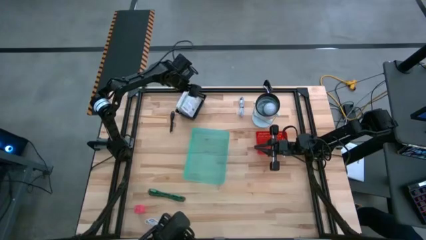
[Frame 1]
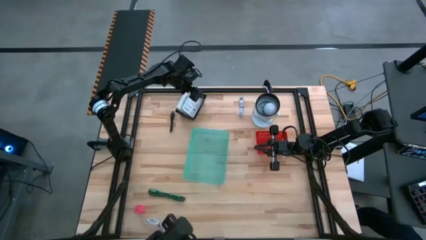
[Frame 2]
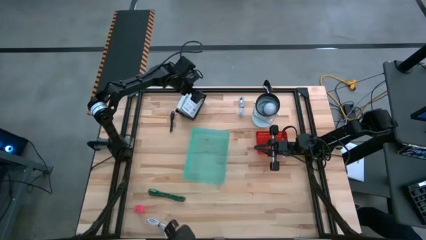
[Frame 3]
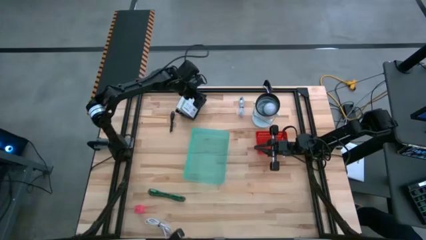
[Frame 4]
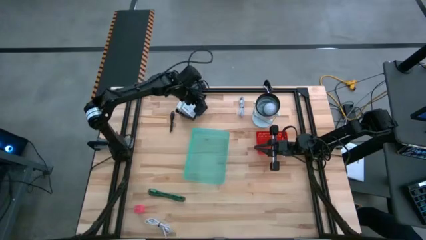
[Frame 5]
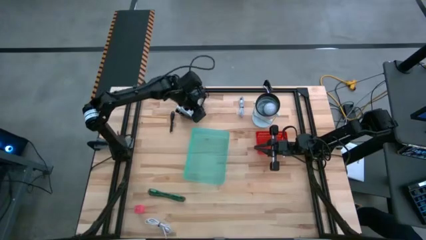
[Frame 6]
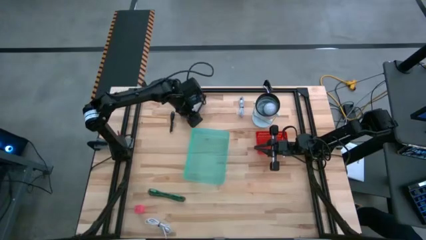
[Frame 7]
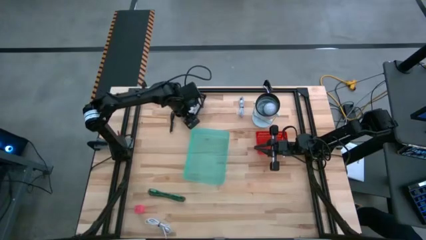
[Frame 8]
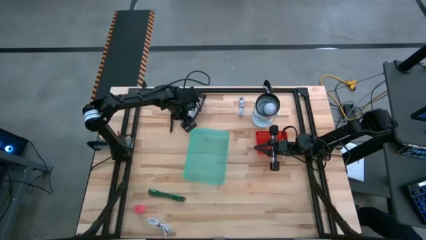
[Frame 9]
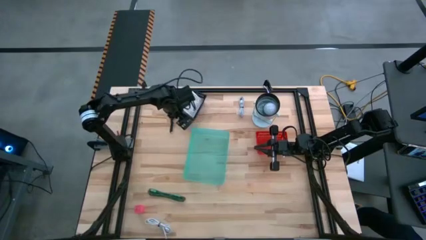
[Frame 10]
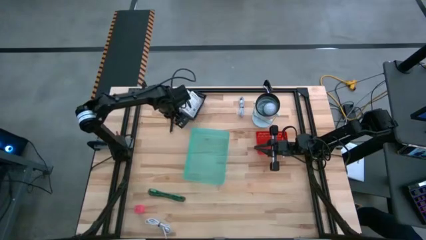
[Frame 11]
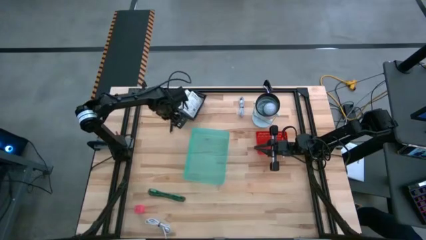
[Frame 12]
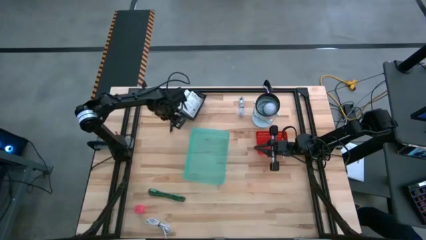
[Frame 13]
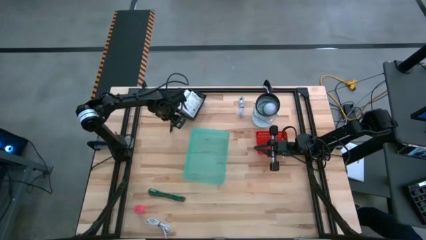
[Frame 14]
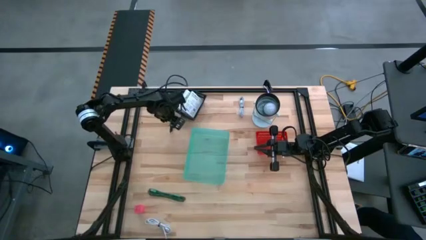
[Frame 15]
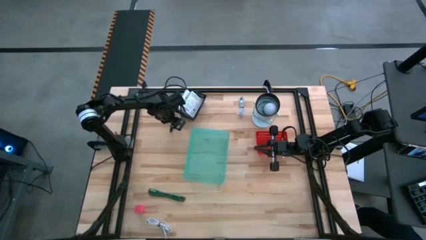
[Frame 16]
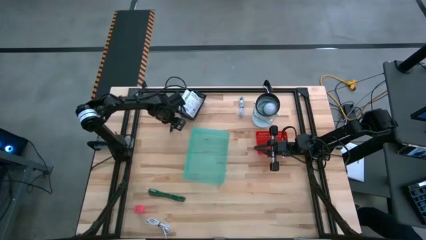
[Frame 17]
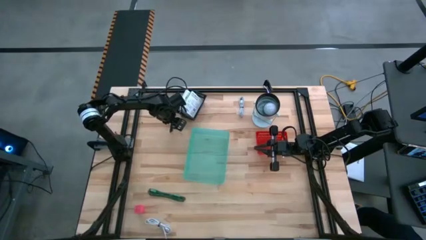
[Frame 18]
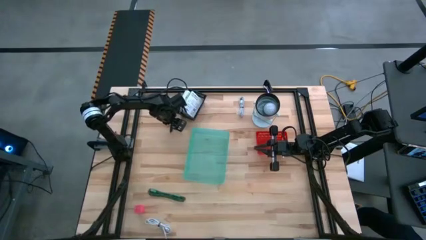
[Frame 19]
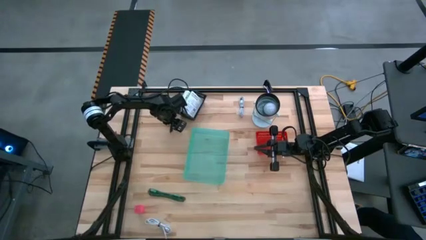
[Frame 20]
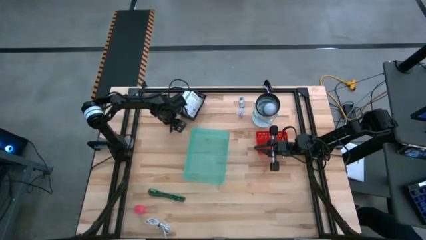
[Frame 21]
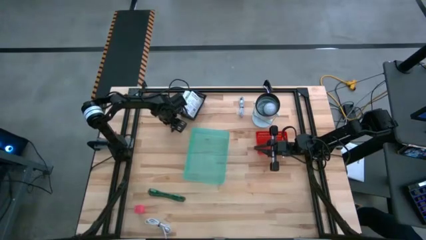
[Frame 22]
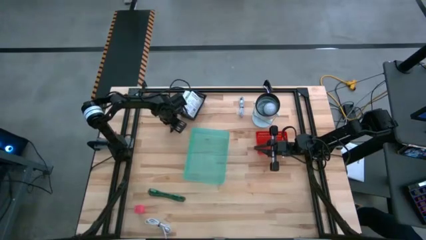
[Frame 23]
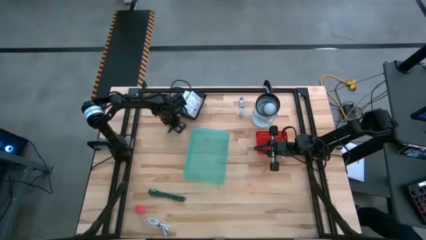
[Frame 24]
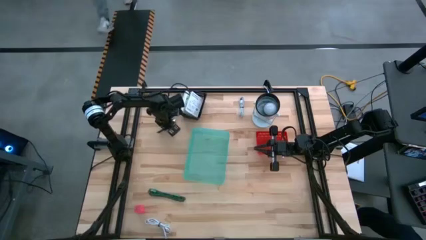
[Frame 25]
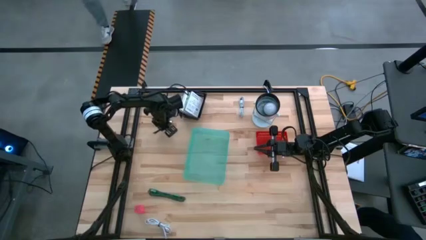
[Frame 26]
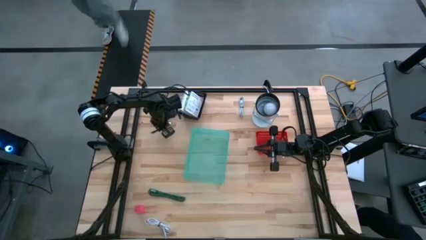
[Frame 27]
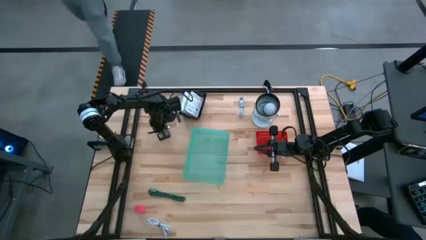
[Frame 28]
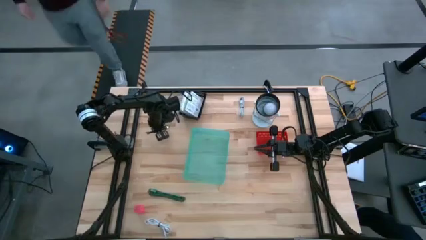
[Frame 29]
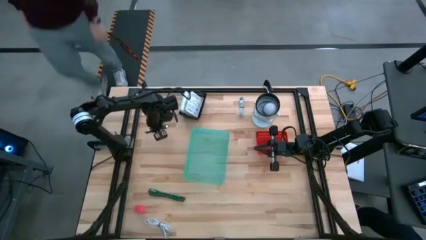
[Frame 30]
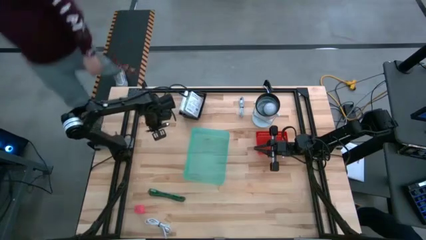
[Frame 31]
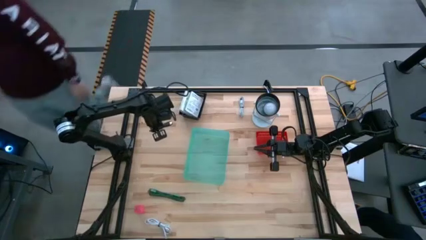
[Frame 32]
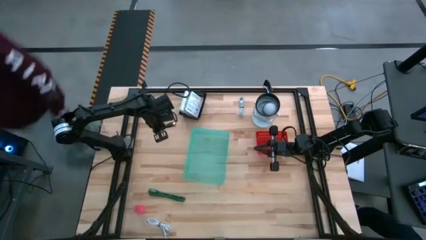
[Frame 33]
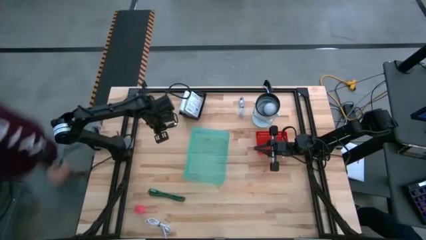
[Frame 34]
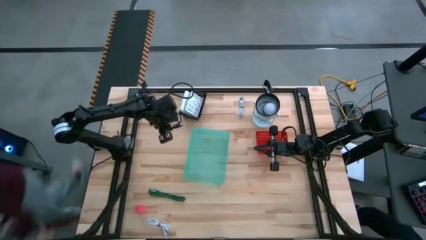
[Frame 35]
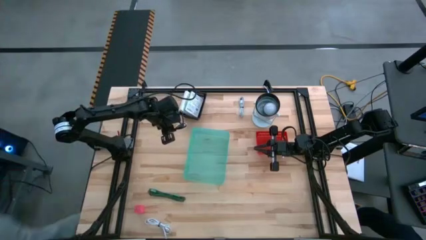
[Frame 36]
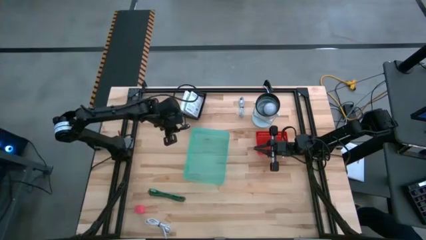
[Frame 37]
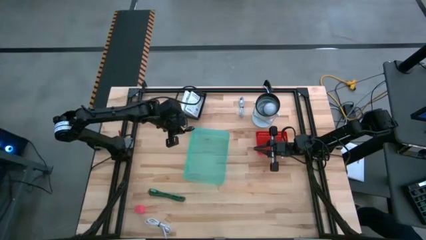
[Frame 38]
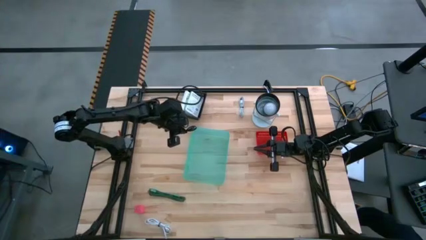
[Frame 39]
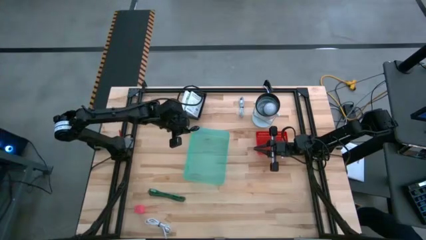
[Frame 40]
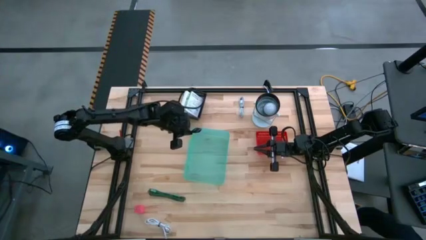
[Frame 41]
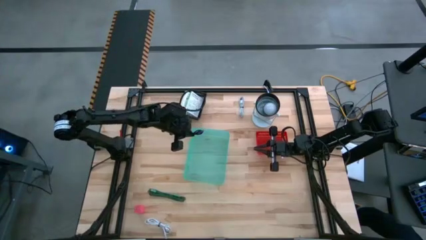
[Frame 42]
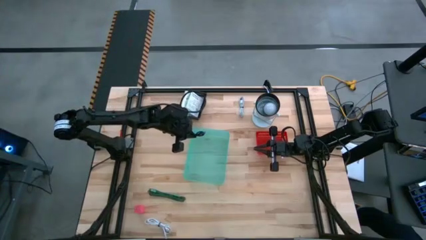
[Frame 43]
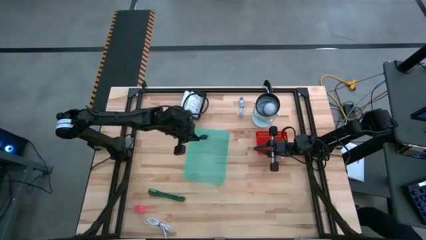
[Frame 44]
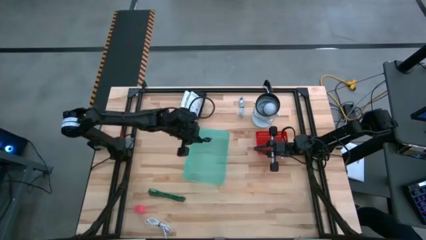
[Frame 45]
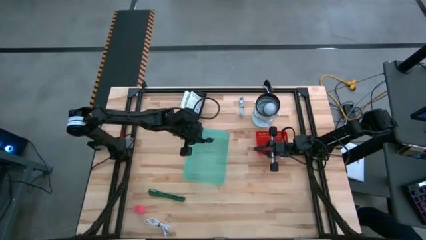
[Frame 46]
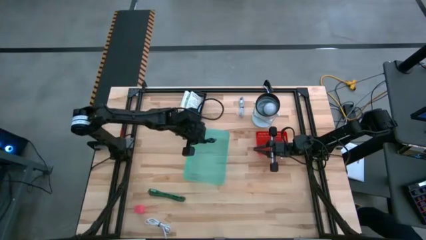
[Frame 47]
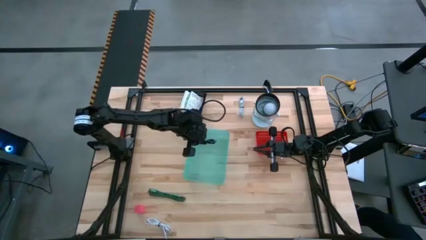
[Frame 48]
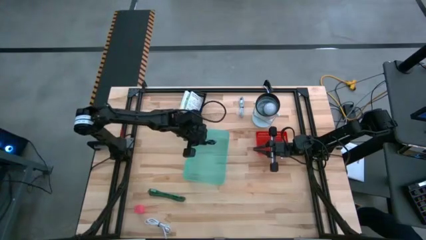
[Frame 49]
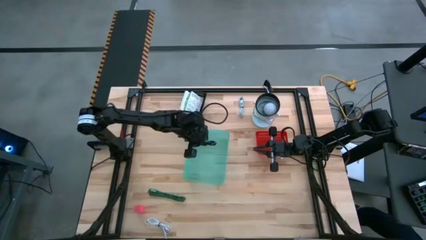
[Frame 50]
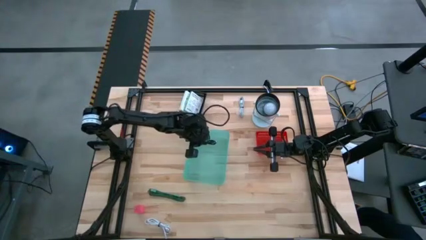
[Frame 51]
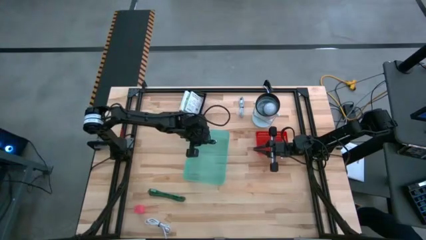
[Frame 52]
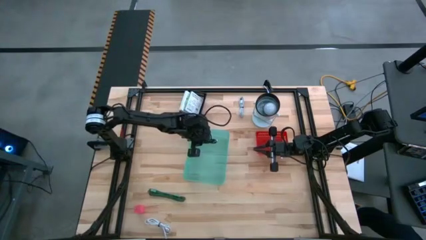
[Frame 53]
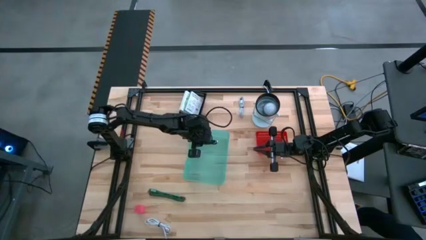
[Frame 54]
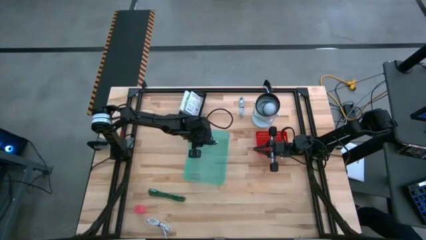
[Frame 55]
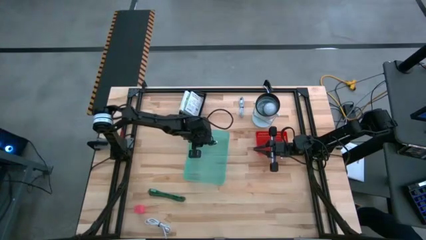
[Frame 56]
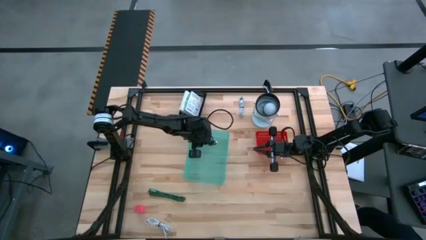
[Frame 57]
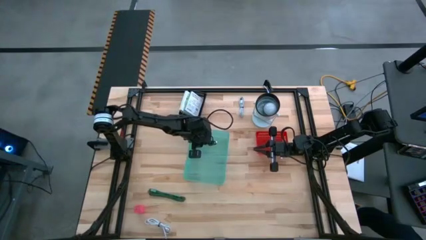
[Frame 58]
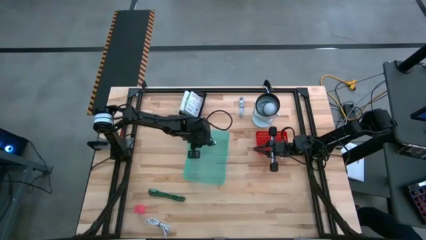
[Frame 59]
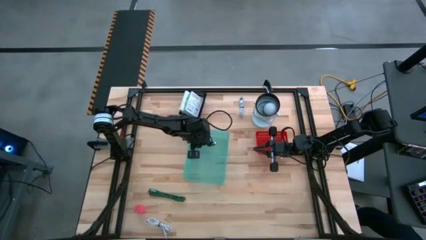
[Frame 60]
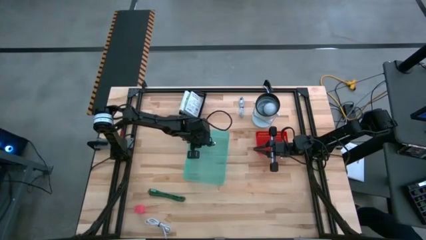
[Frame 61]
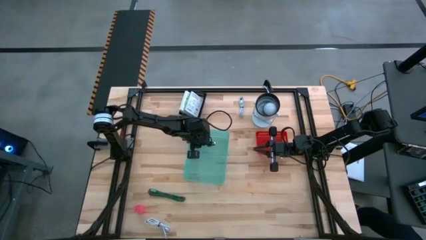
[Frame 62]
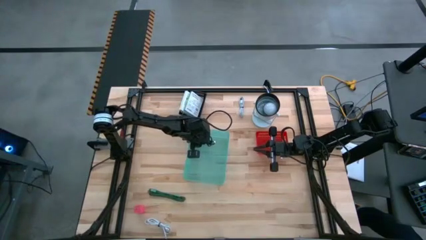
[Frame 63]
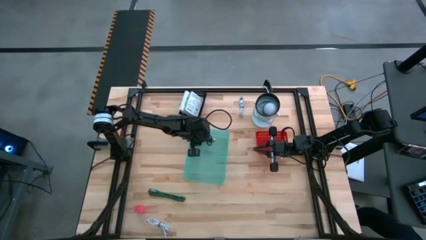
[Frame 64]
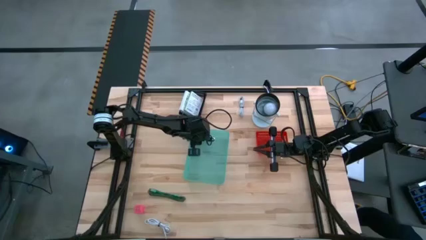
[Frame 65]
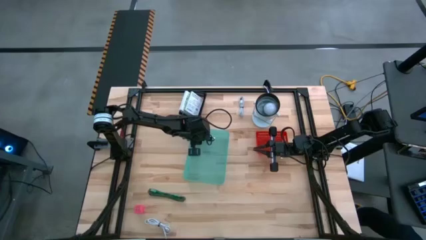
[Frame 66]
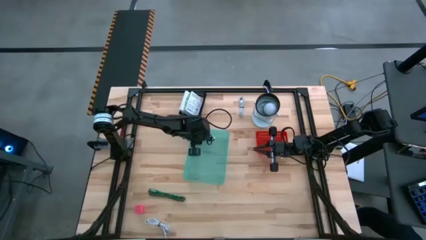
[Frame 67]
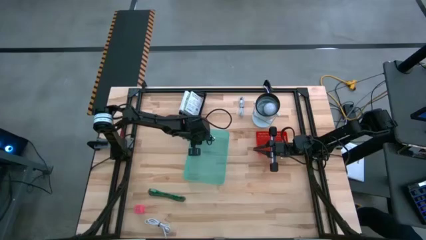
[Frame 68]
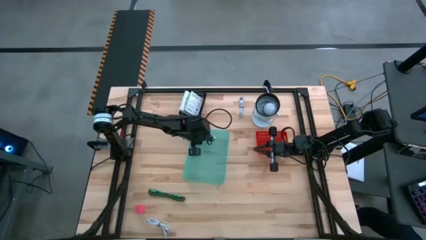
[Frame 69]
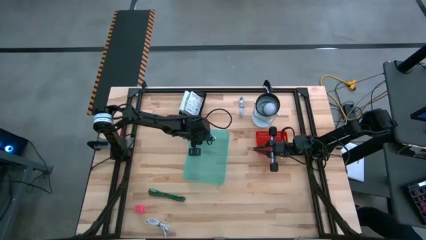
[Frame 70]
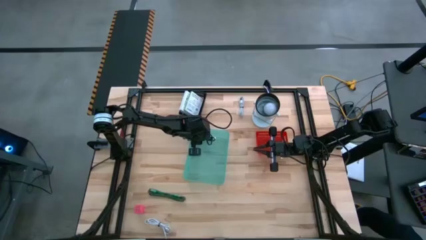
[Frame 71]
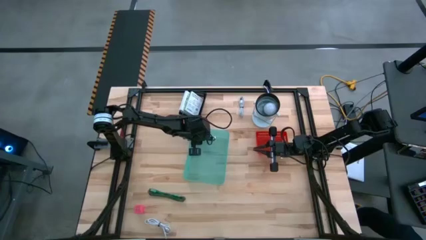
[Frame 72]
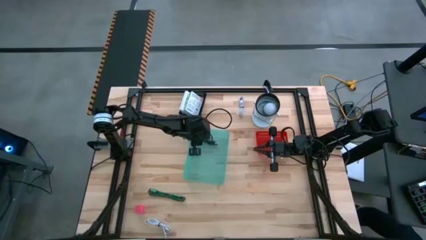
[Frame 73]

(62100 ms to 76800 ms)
Task: Pick and place items into bin
Put the black charger cable into the green bin
